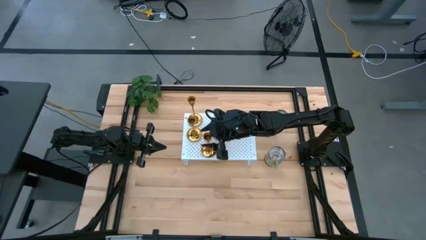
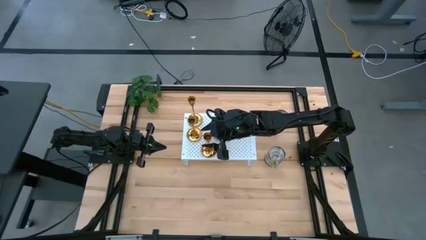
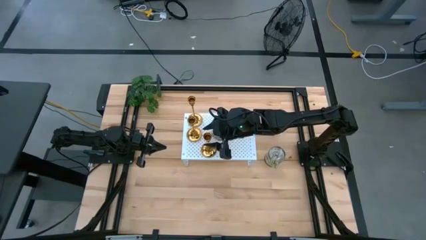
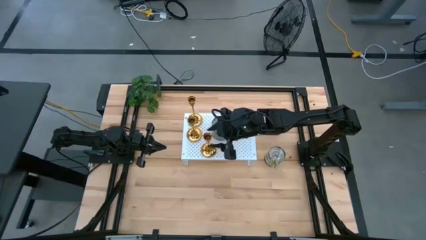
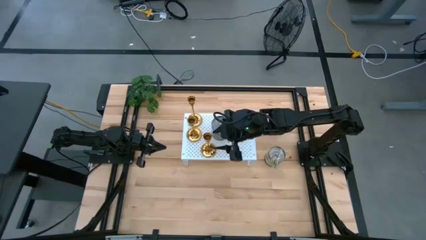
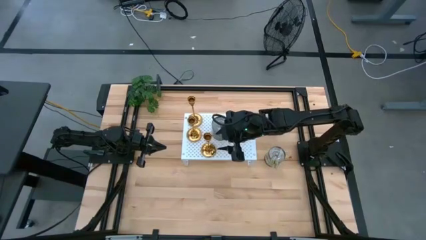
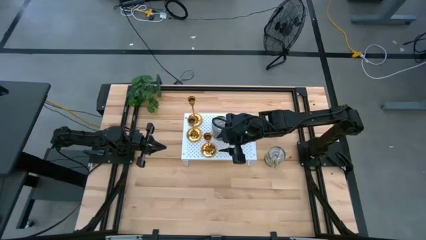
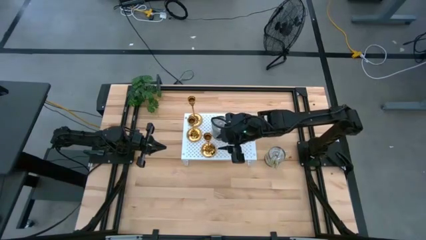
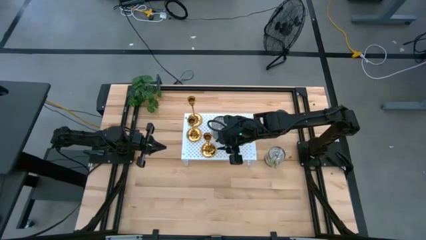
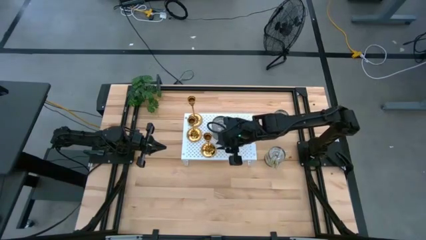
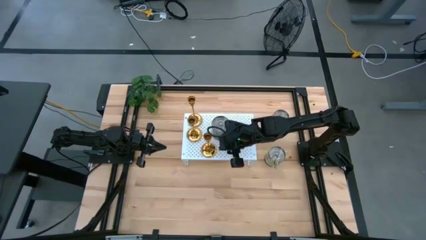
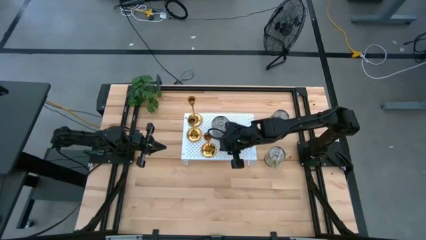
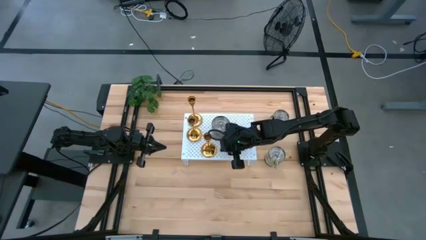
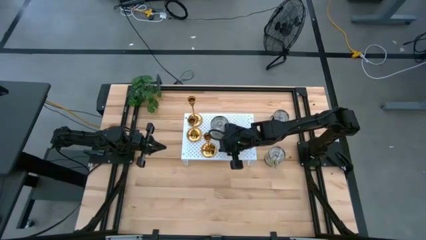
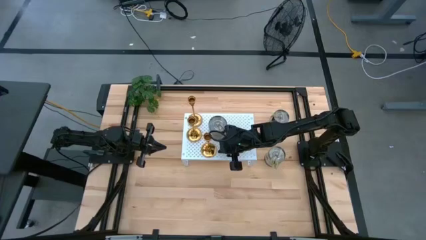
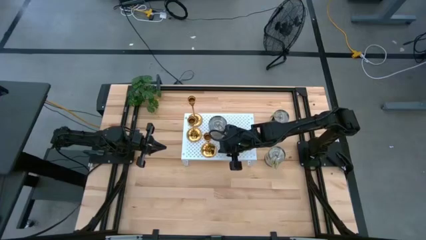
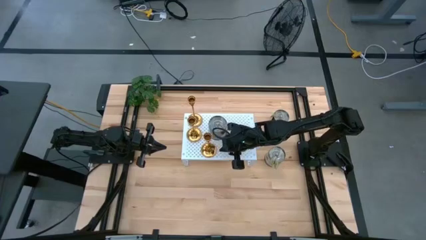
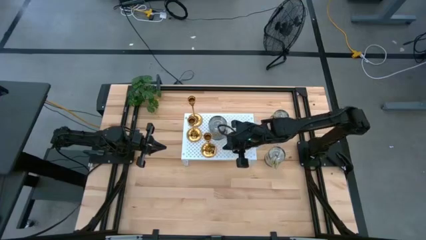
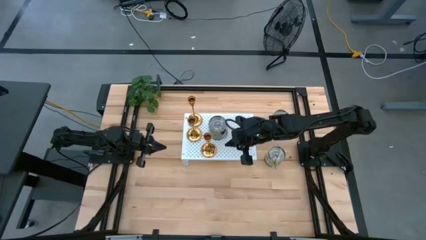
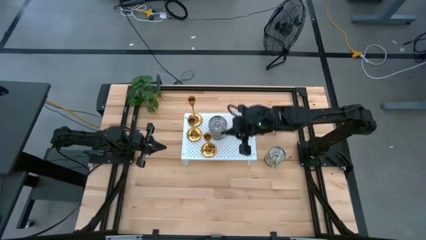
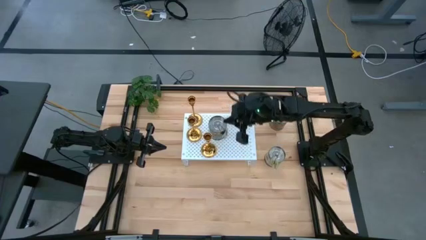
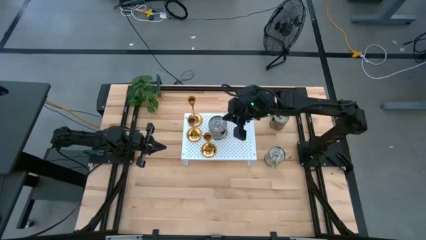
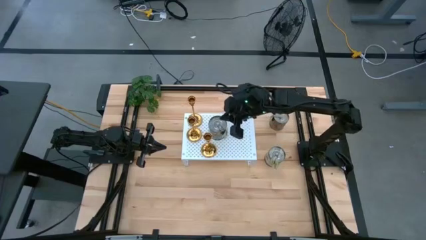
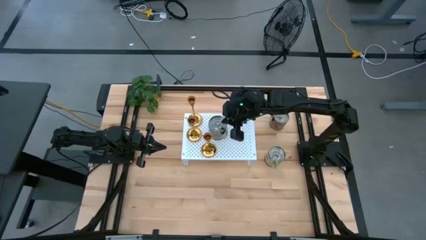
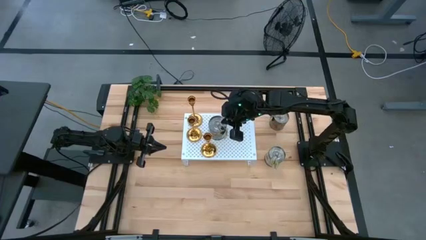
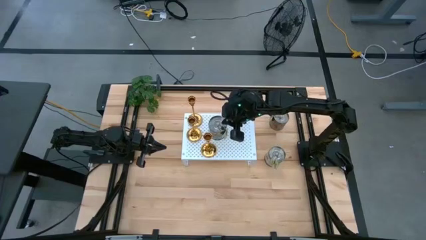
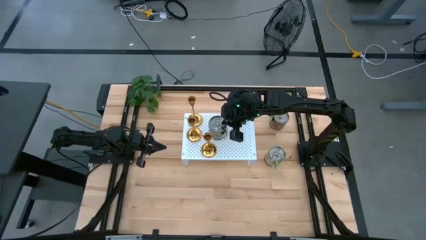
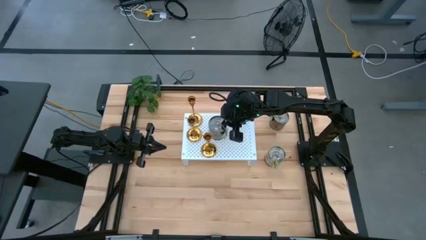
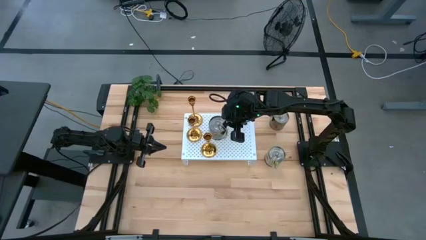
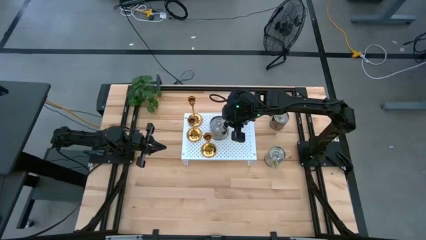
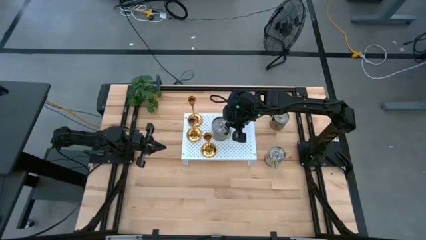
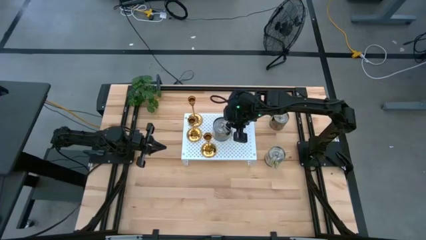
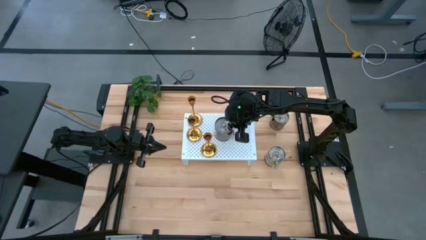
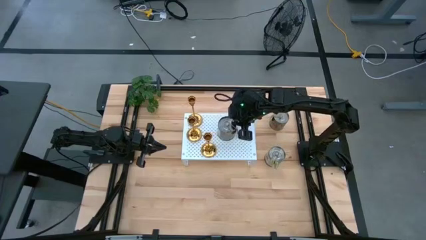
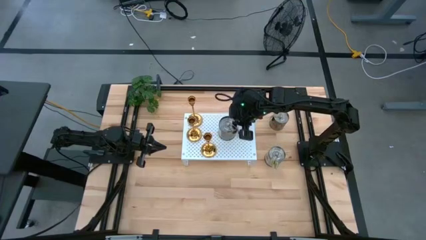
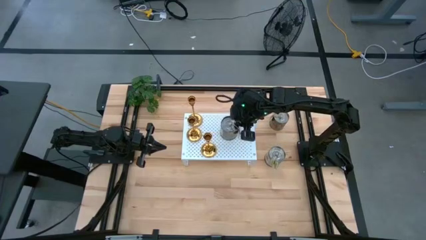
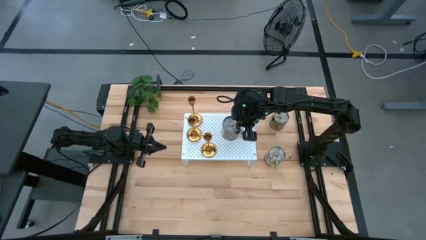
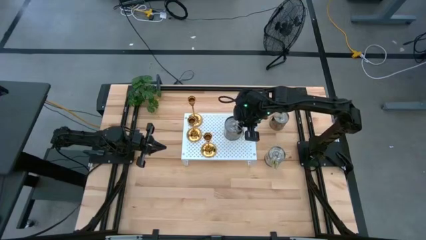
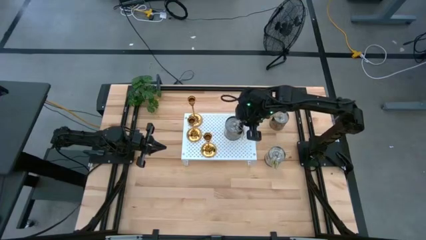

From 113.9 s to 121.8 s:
Task: Pick & Place candle stick holders
Adjust the metal lid scented candle on the shelf

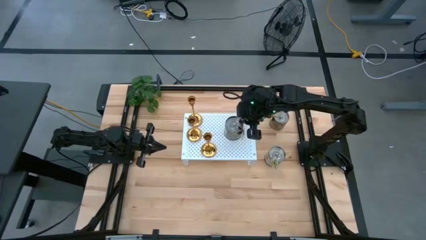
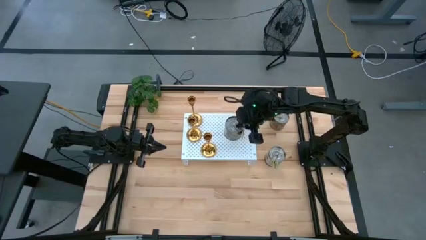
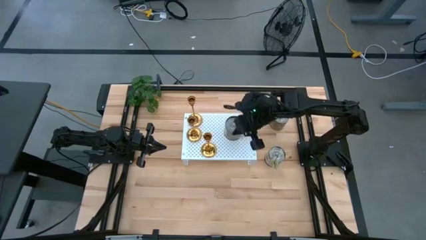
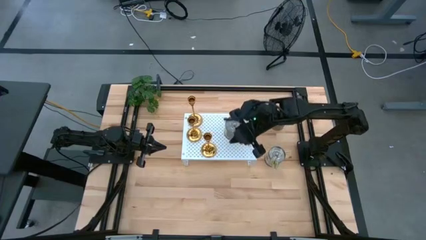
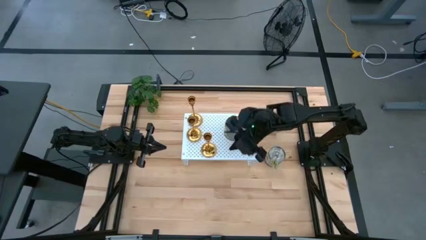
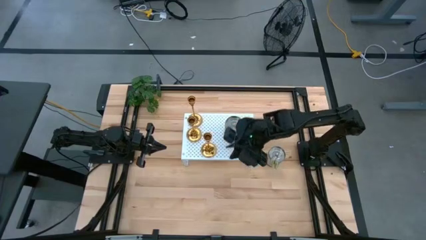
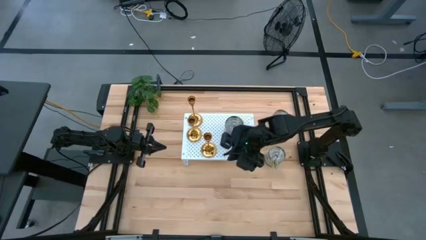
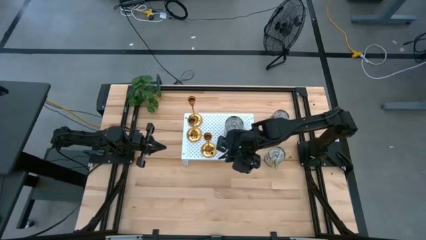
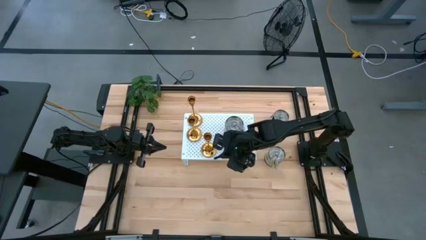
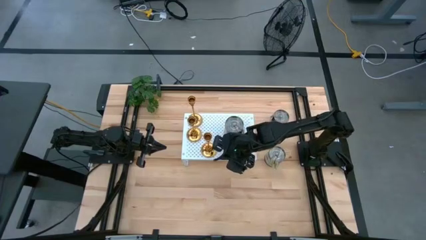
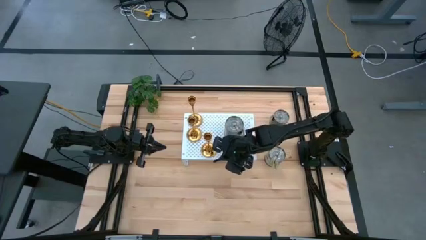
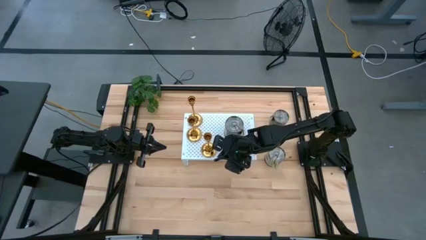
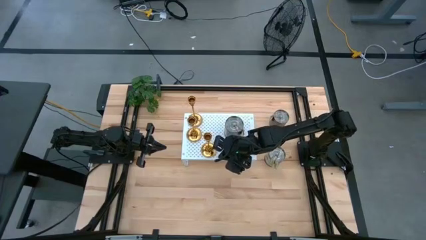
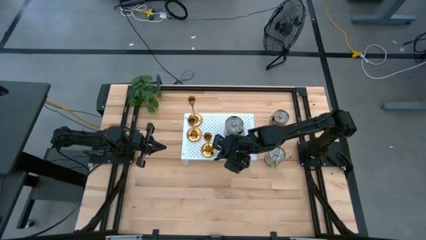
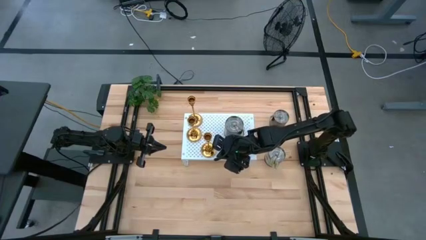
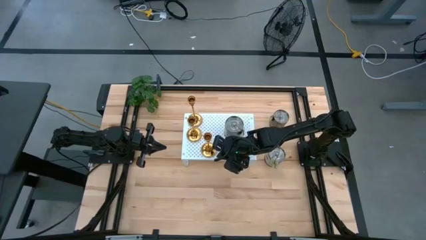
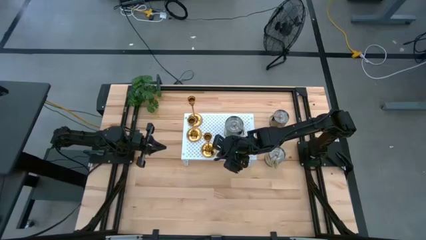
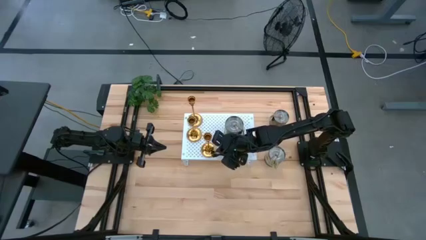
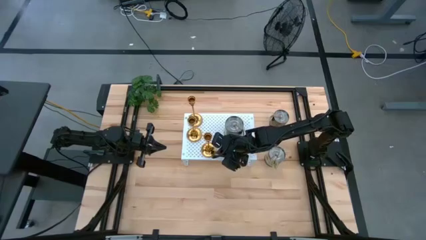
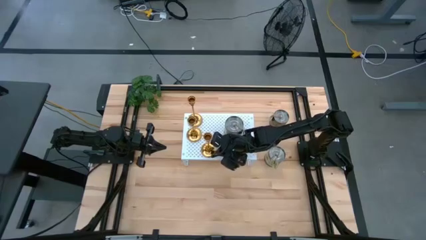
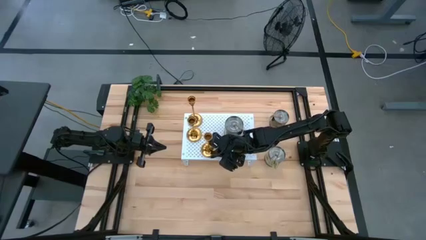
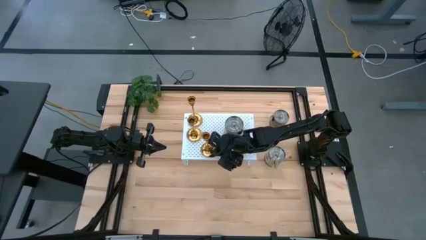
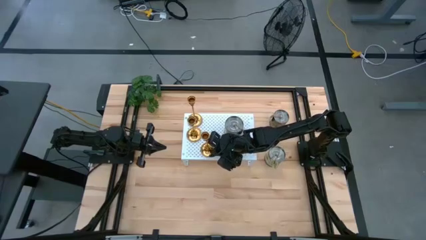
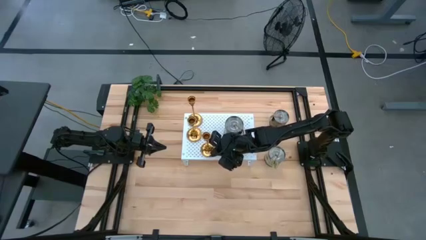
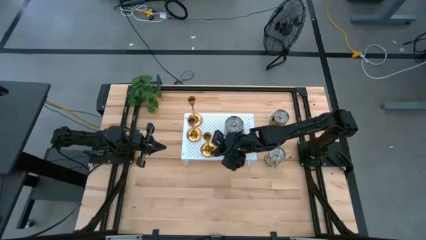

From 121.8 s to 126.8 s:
Adjust the golden candle holder on the shelf

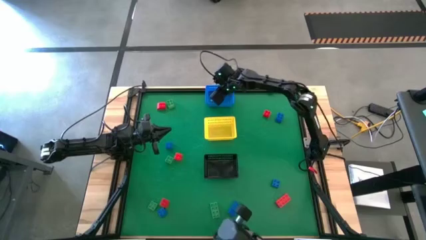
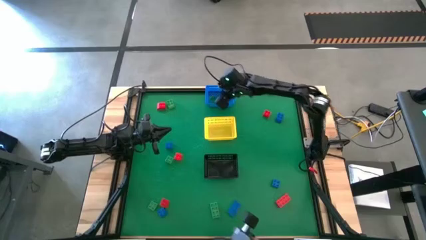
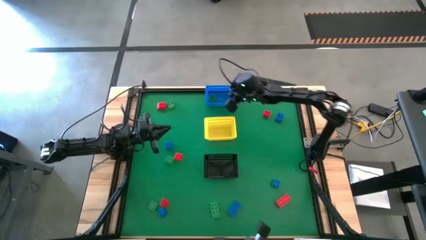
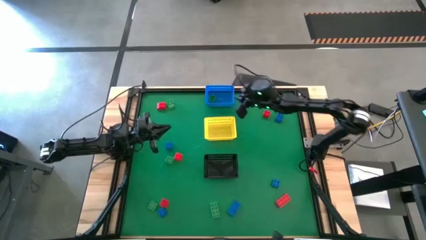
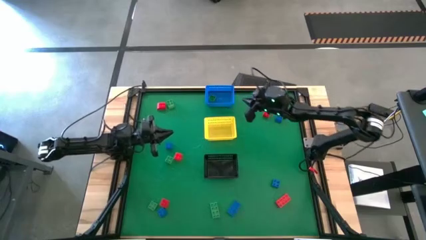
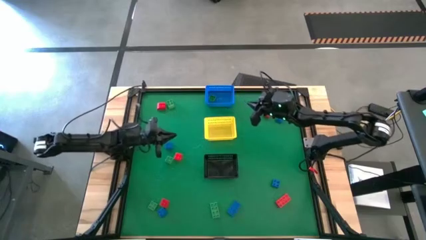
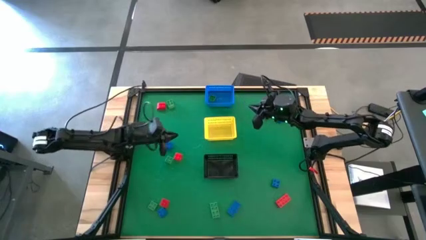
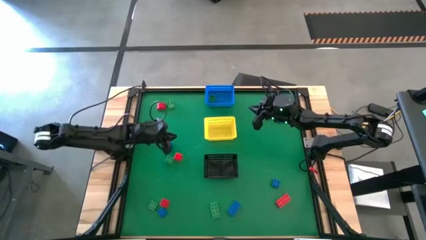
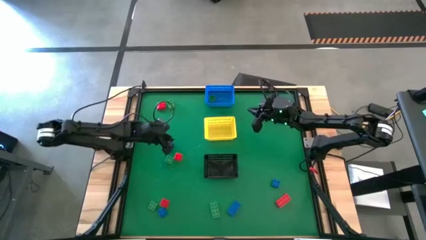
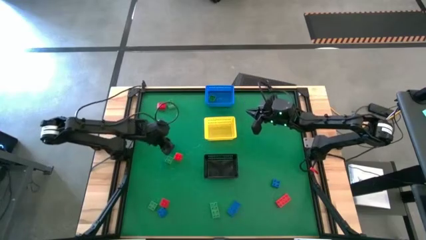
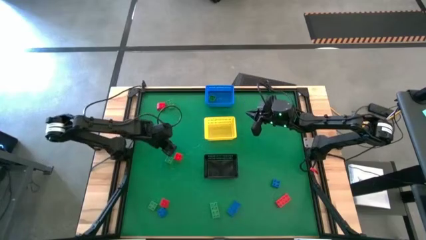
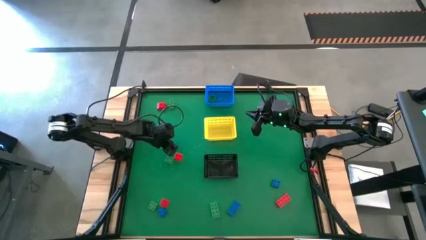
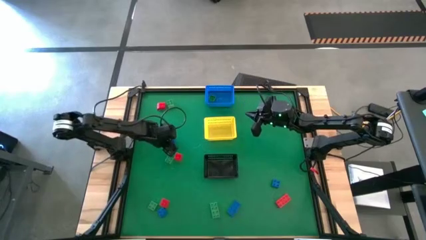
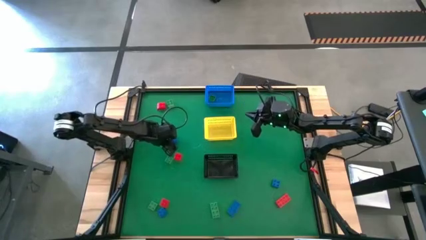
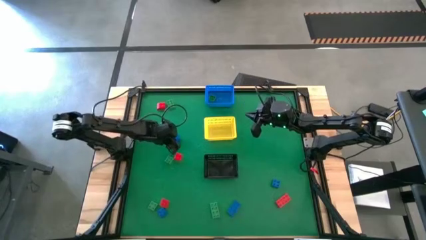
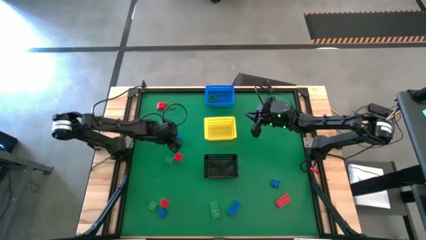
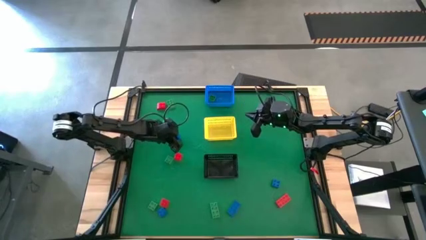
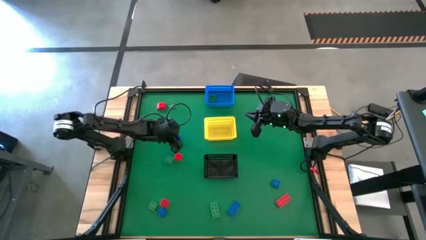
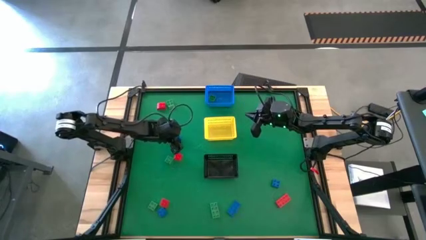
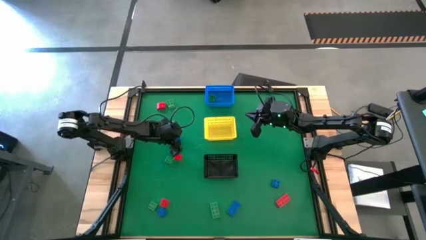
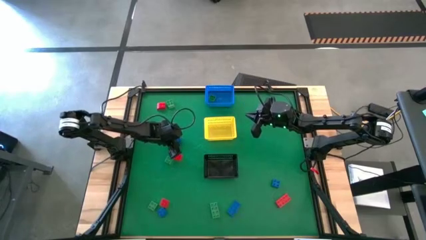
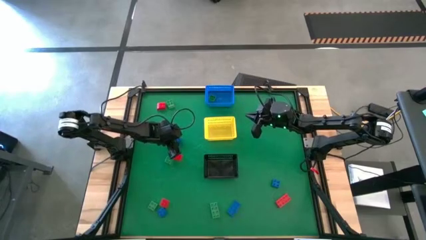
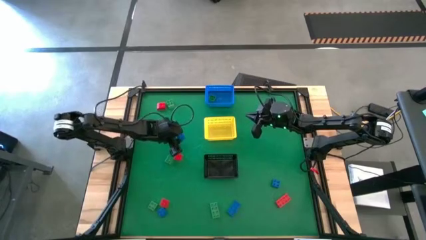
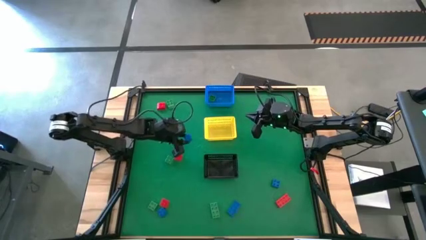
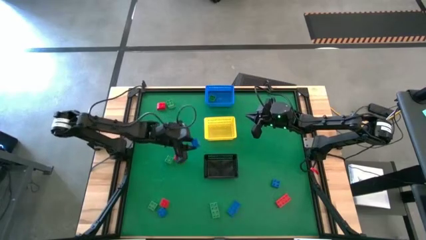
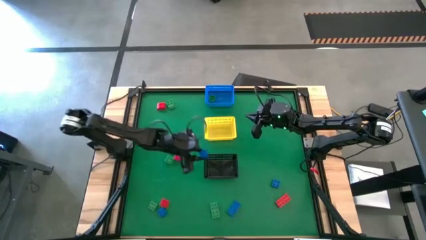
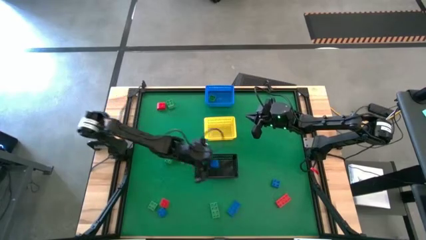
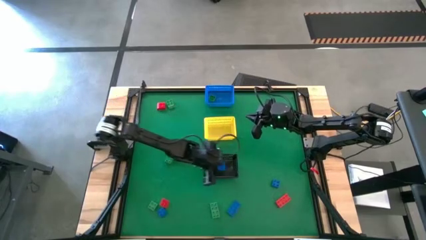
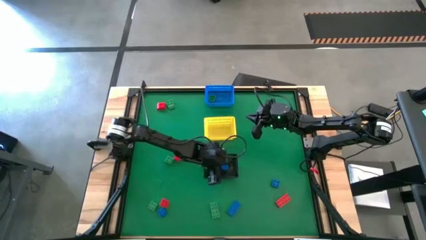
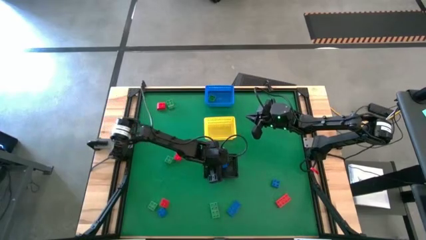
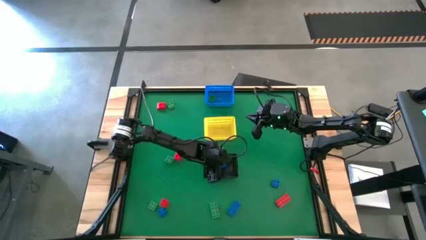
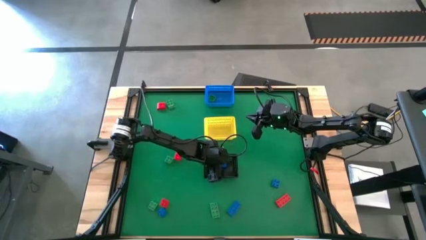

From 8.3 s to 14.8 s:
Task: Sort & place blocks by color
Put the blue game piece into the black bin
